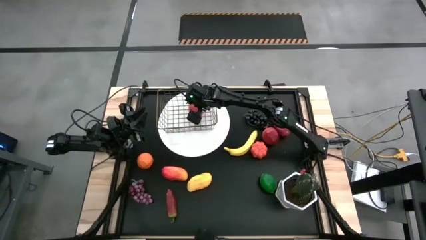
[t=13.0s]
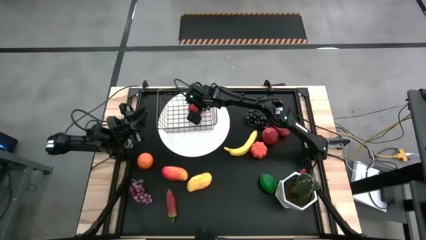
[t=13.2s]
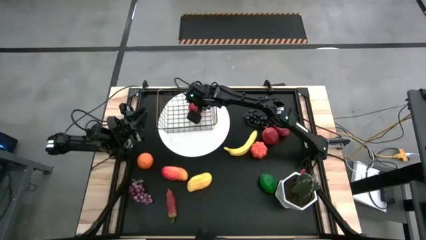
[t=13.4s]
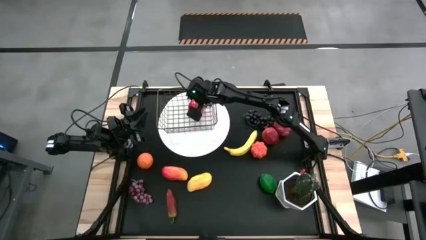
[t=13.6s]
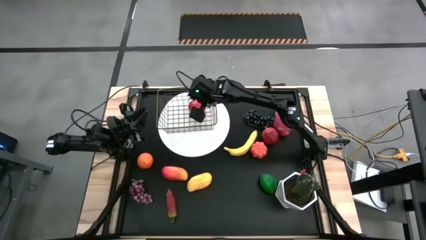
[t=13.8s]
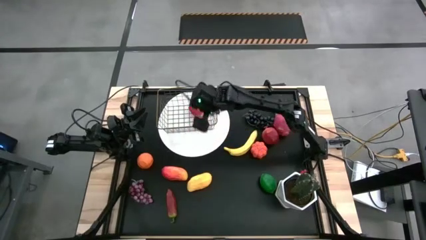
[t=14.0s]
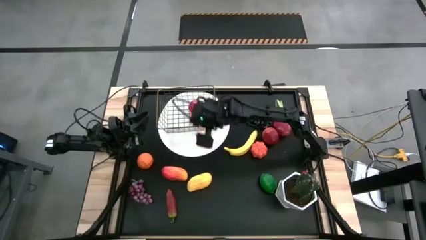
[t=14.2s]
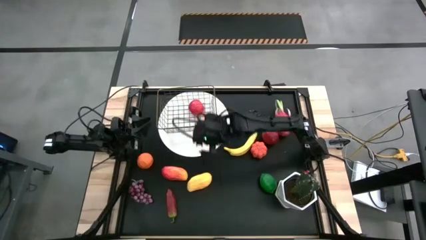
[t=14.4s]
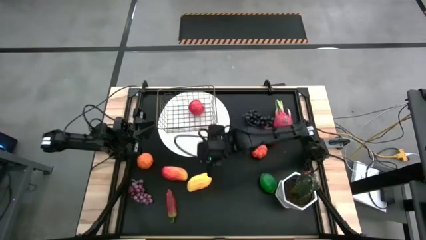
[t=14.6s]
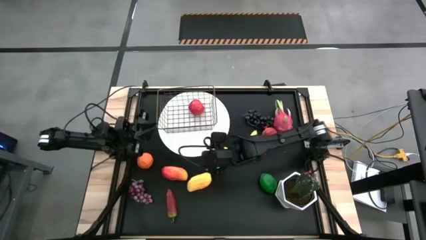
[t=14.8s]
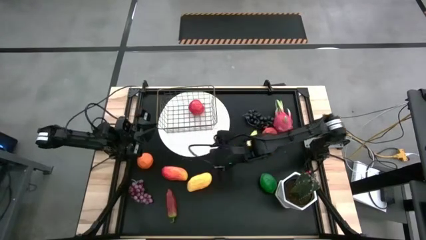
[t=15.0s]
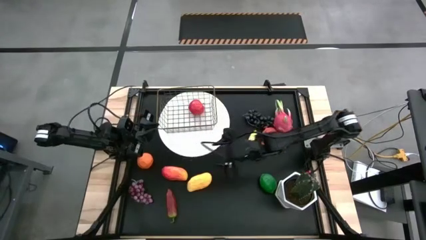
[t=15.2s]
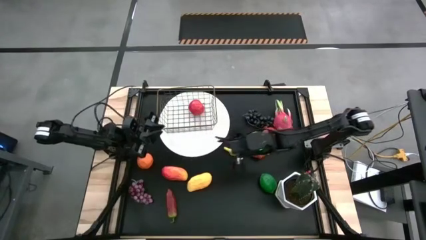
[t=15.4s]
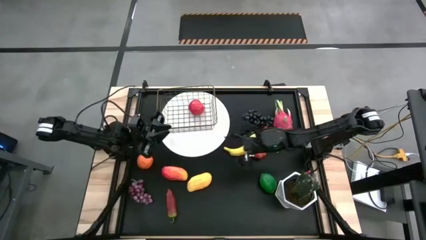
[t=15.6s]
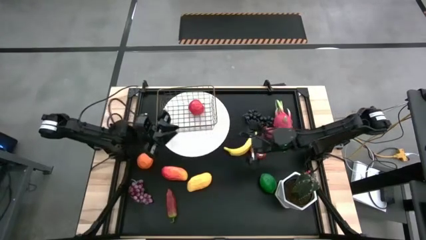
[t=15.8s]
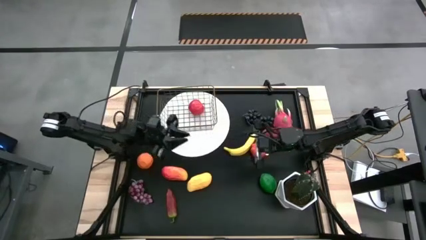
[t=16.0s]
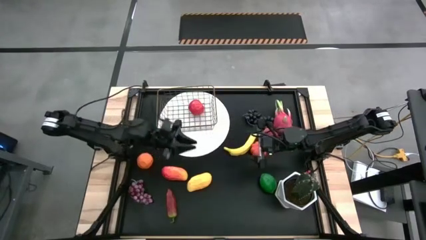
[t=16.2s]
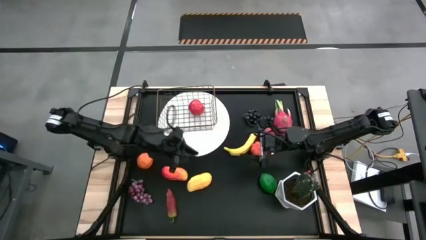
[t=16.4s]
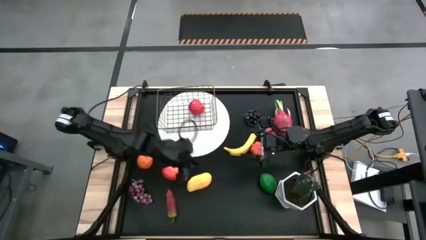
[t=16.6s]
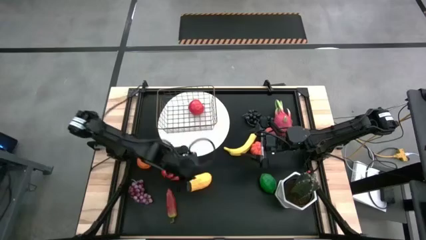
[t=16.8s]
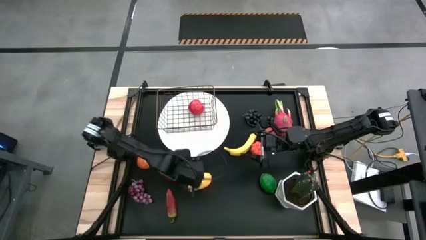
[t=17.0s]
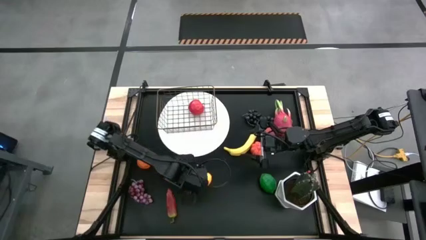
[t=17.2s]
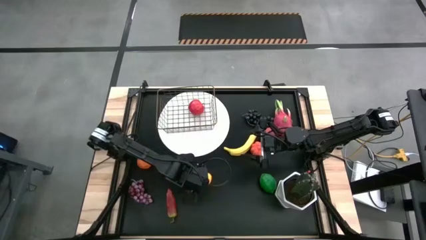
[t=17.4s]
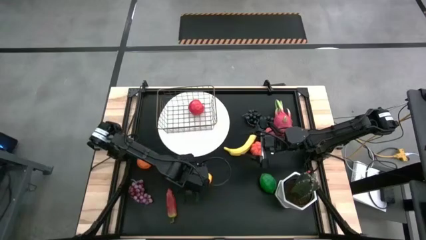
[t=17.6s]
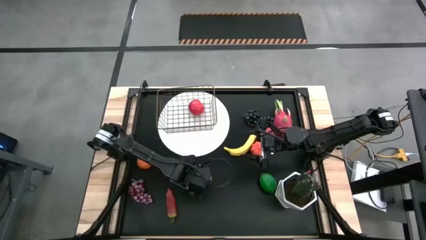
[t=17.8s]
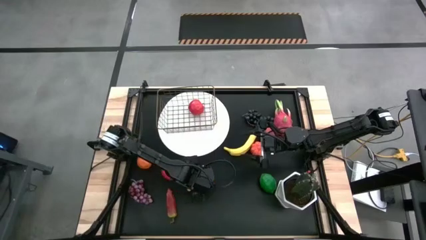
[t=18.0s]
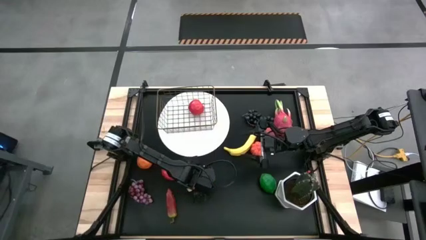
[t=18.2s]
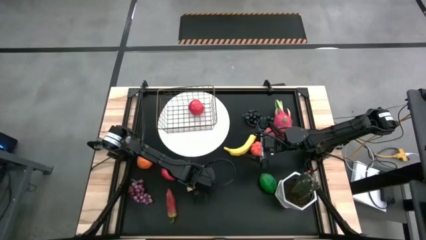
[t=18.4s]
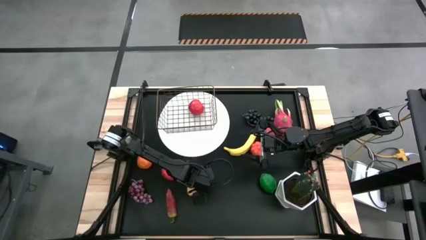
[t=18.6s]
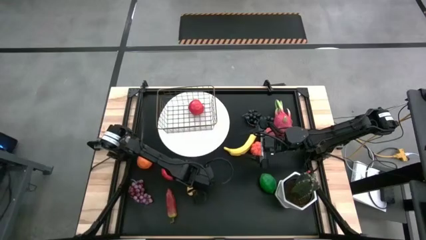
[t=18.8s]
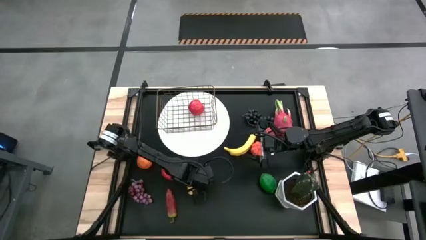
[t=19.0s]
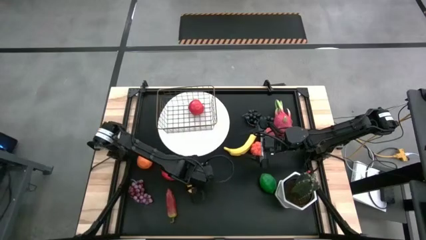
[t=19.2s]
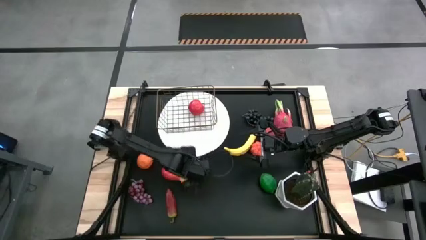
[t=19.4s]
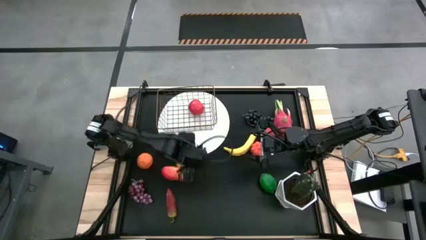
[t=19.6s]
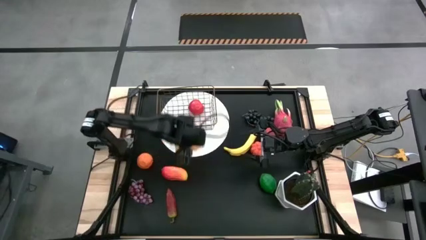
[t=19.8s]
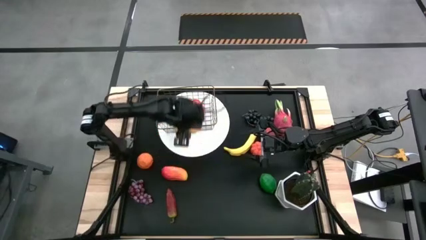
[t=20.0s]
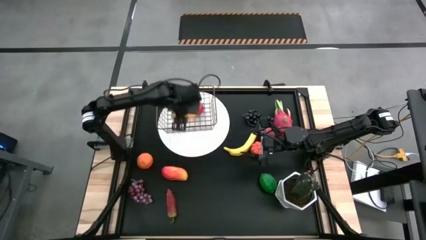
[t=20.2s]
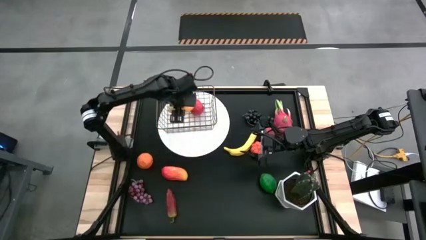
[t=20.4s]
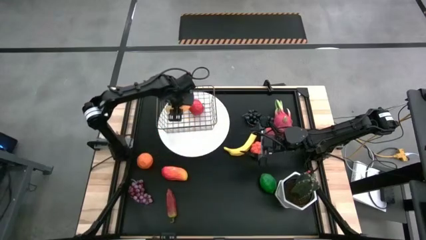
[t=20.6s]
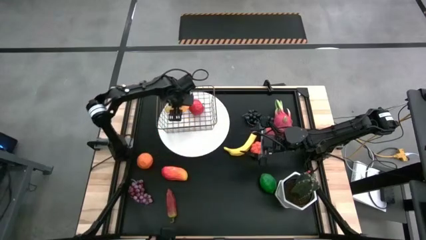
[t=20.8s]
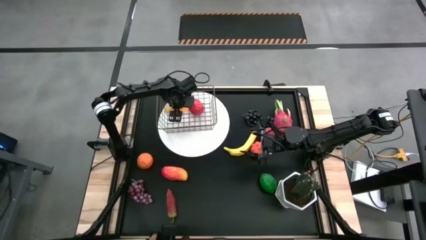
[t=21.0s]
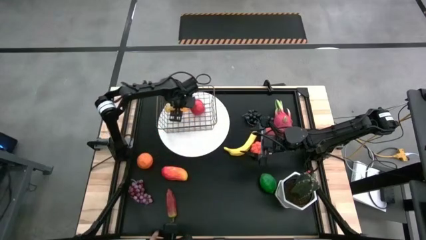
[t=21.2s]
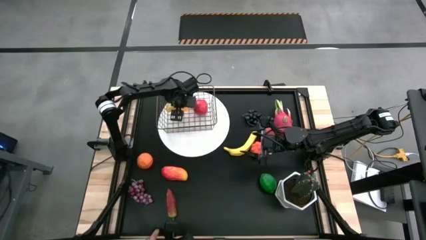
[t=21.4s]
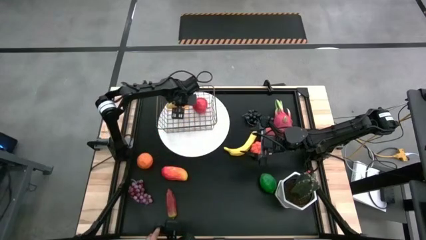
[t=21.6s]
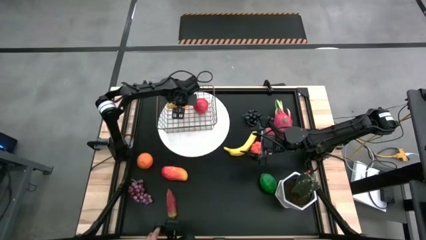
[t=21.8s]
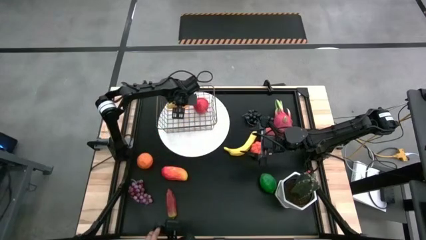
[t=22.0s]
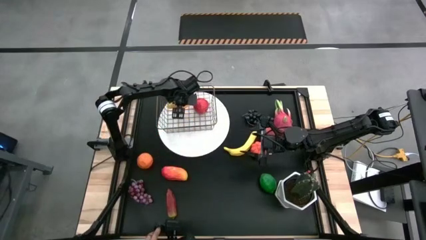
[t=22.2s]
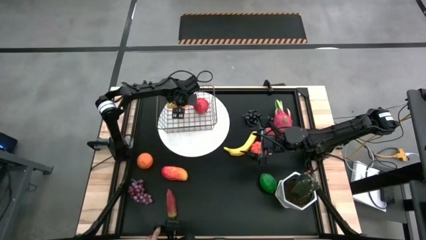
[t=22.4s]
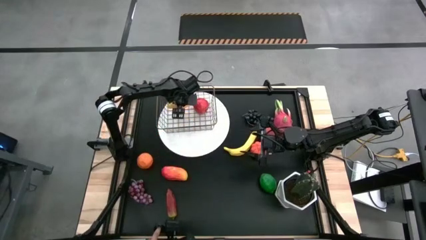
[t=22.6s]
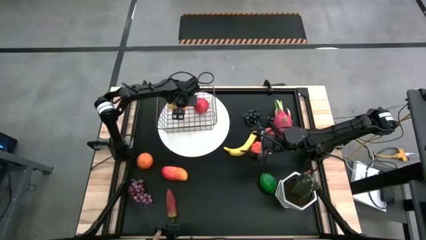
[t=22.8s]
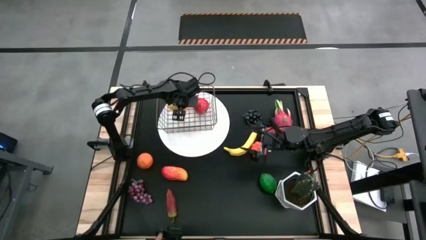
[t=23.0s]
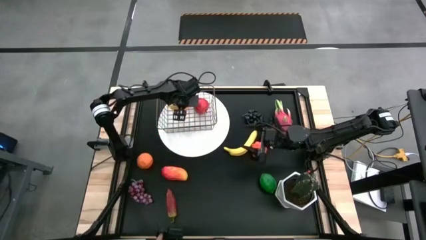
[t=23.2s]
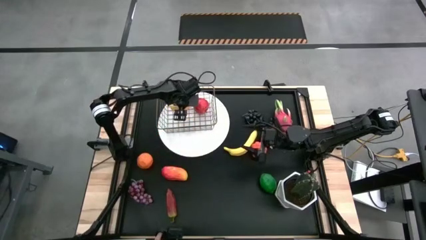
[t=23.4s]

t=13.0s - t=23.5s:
Task: Build produce basket
Put the yellow mango into the wire basket

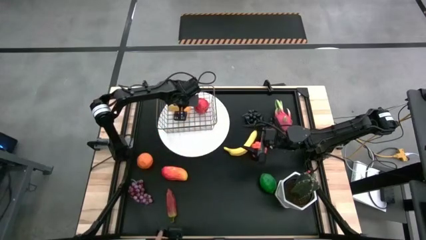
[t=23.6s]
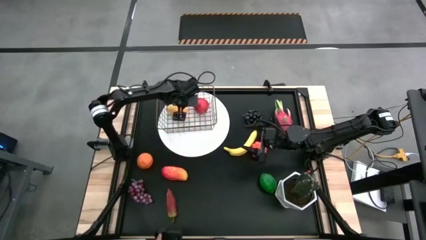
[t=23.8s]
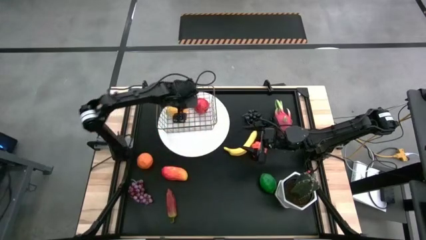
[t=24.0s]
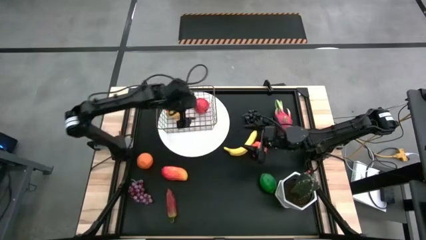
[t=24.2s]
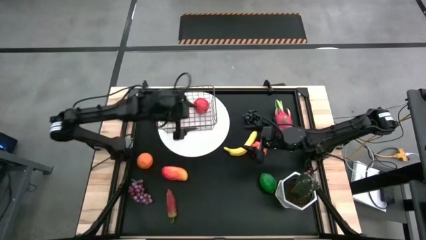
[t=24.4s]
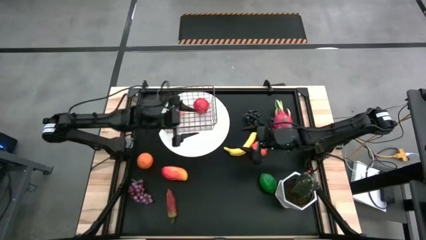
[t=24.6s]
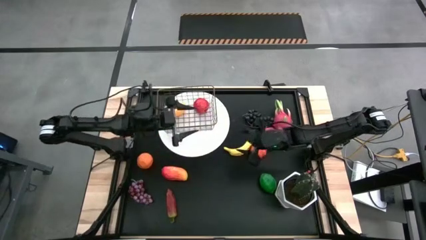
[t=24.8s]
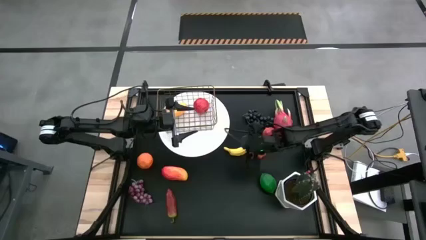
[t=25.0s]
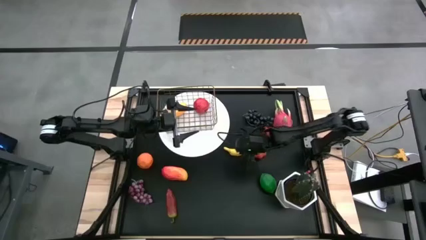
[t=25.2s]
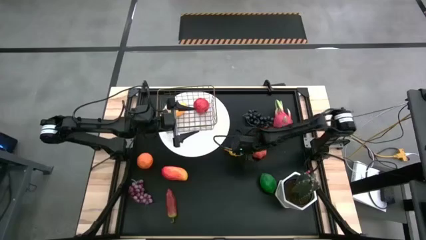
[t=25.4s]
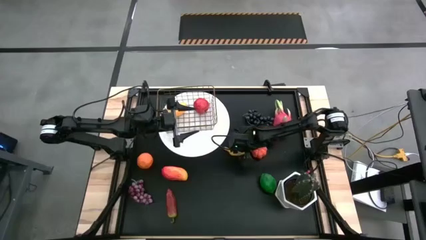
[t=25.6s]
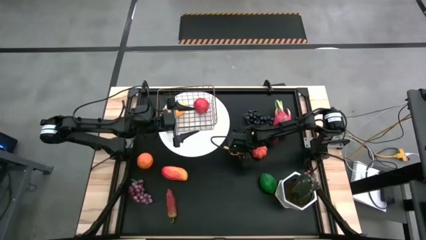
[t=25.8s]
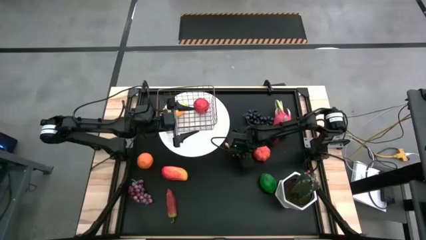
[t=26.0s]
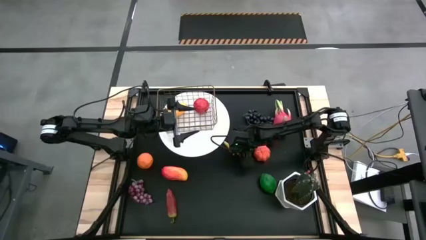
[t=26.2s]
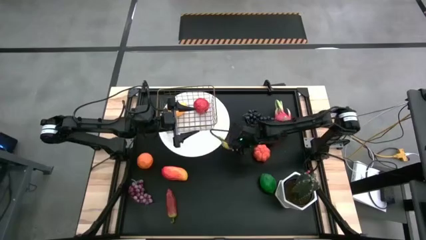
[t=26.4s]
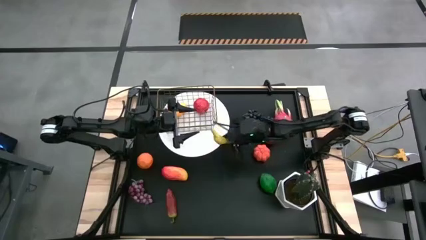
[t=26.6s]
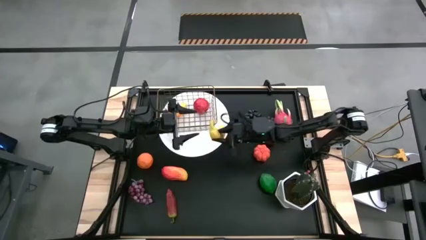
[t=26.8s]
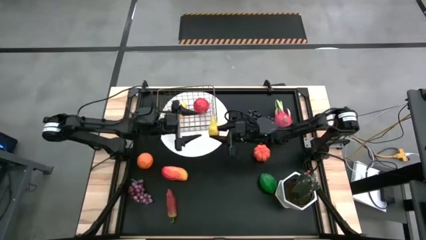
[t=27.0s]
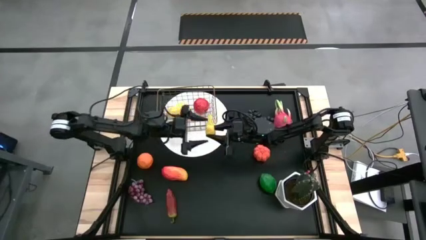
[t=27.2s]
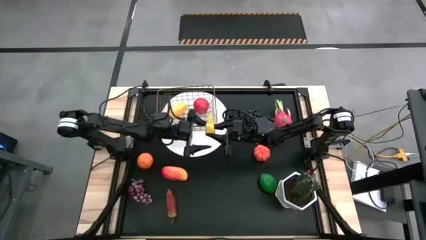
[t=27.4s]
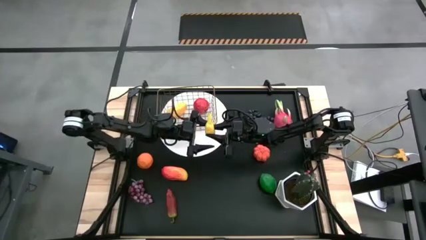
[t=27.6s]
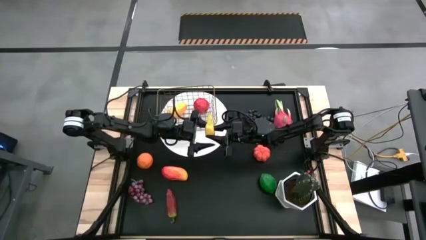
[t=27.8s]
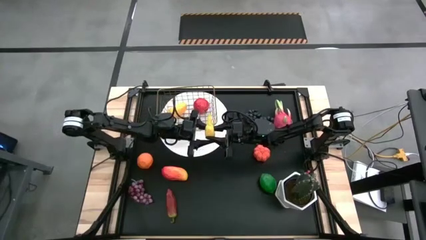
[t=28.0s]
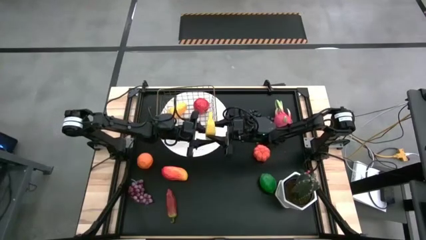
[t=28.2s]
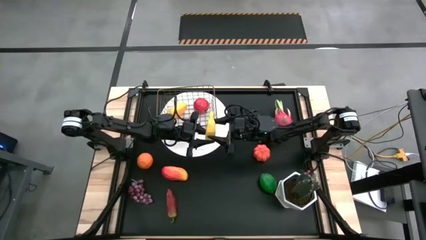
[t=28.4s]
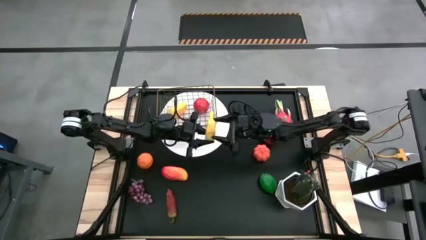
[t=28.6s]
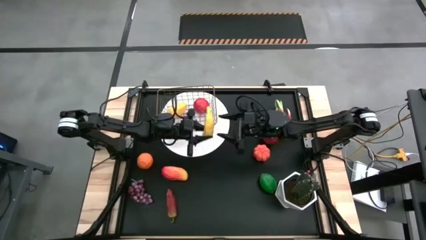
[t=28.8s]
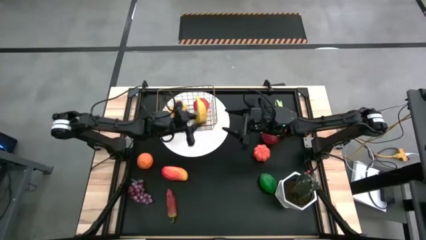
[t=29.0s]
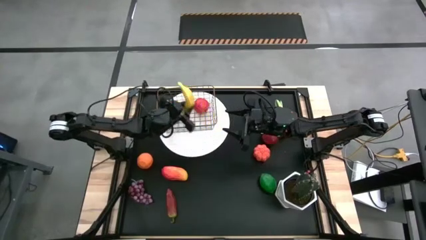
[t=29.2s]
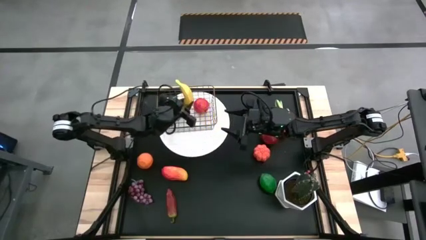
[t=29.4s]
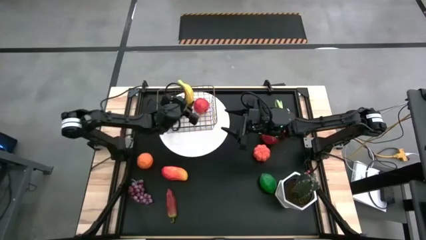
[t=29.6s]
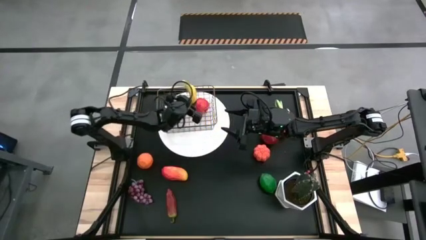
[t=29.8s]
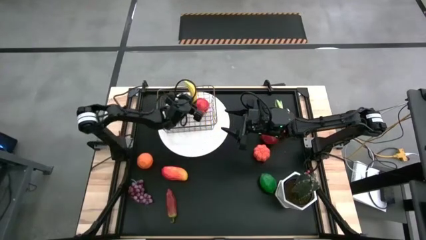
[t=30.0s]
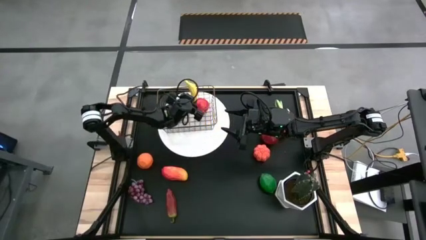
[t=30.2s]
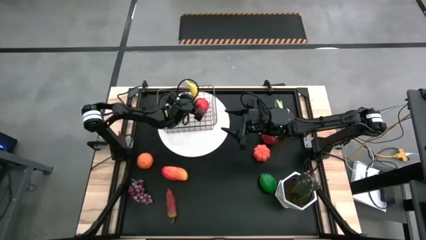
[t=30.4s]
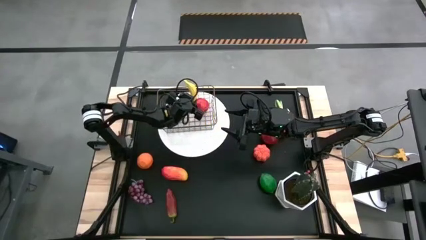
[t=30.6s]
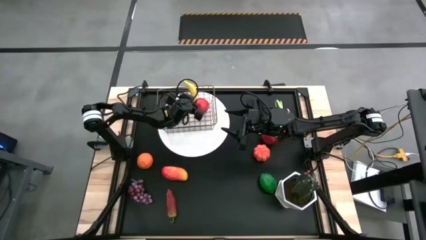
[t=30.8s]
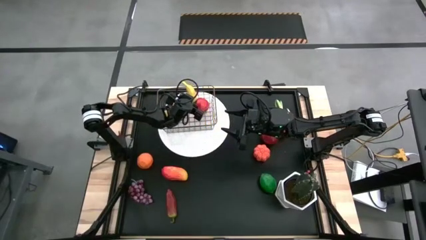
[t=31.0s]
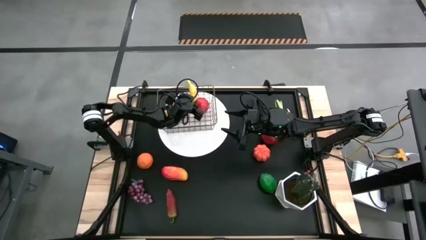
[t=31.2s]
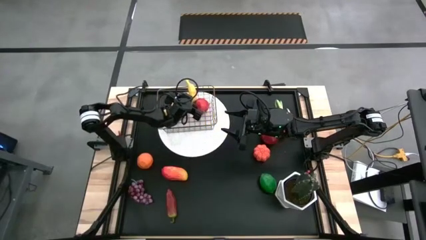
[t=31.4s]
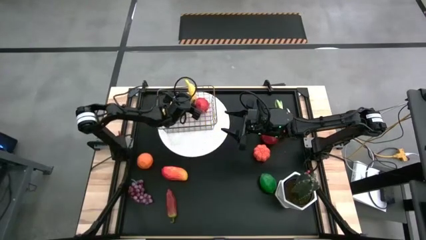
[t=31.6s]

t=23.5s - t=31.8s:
Put the banana into the wire basket
